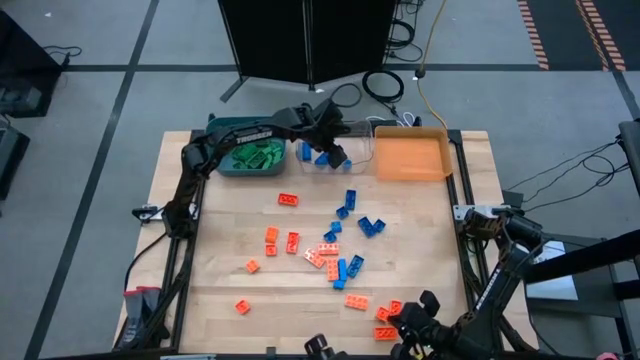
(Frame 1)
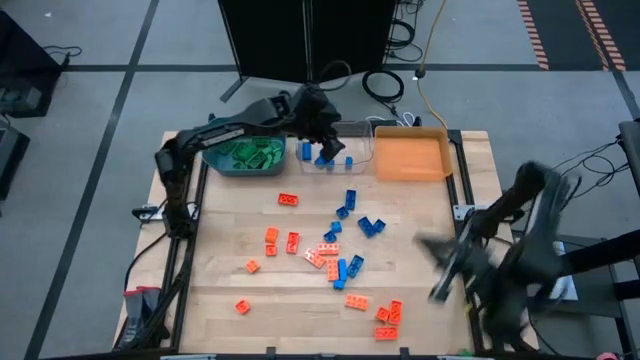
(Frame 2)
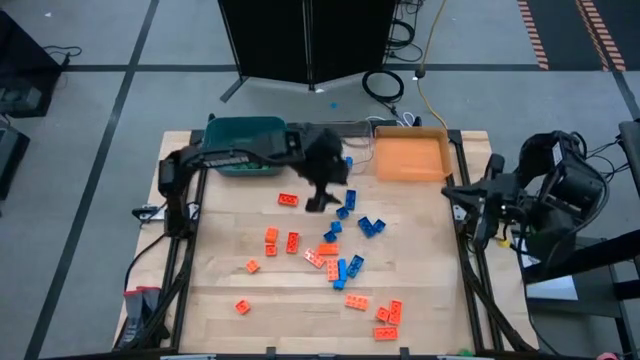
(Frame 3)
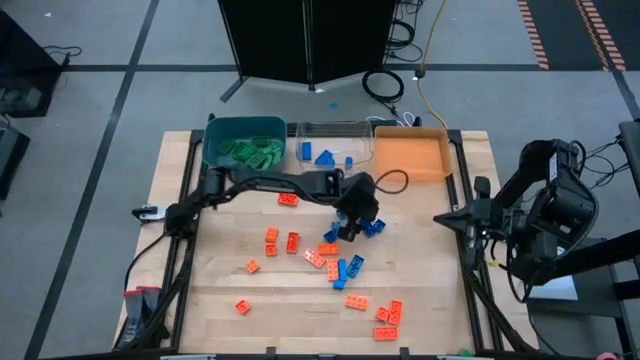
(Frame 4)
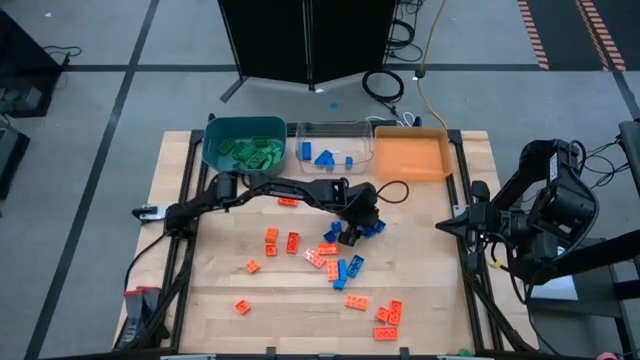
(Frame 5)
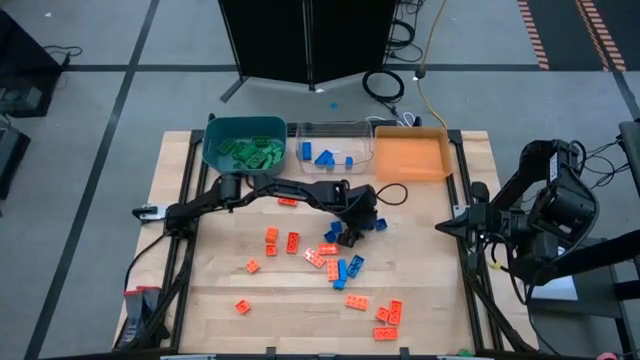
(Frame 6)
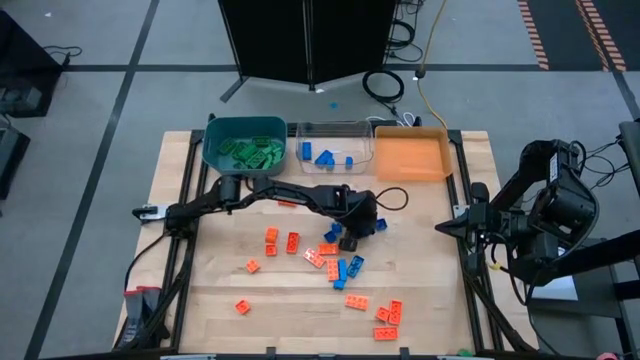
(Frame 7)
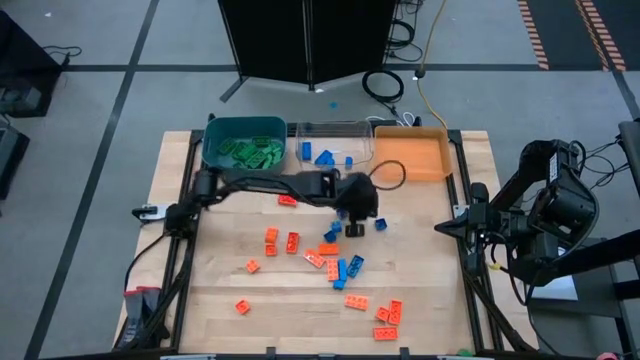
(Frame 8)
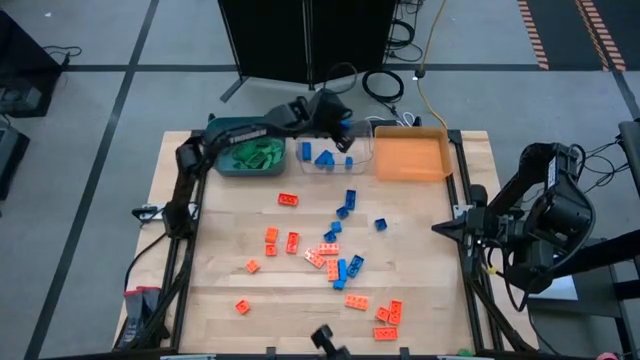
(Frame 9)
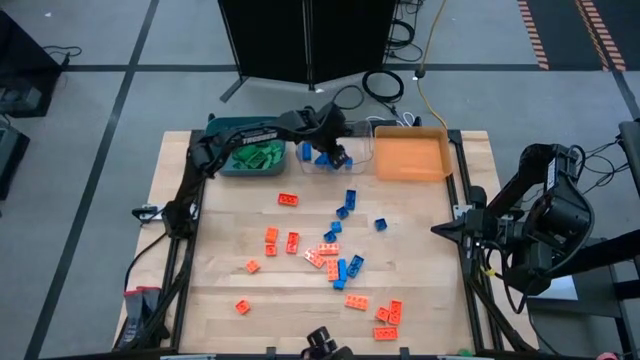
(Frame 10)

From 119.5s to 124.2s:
Task: Sort blocks
Put the blue game piece into the transparent bin

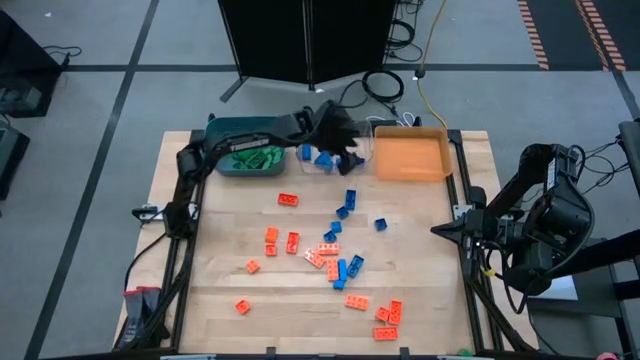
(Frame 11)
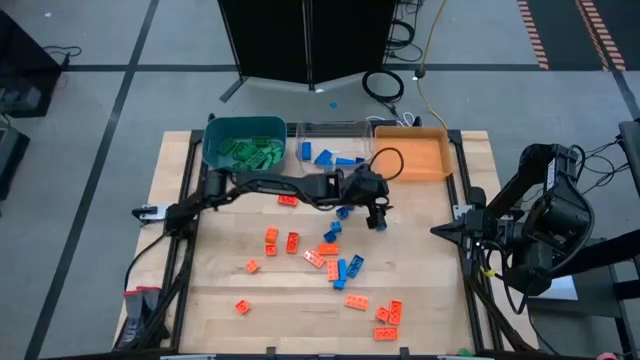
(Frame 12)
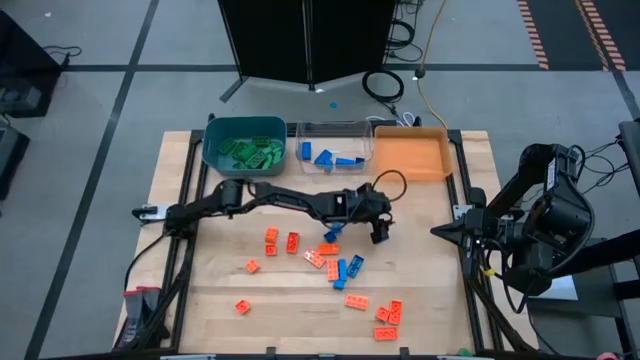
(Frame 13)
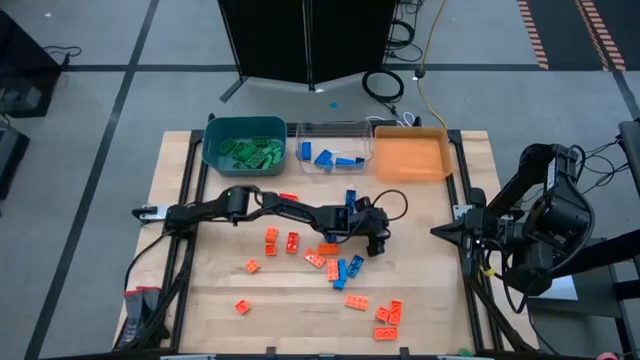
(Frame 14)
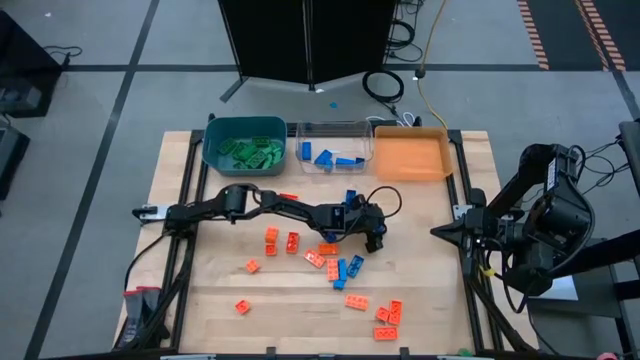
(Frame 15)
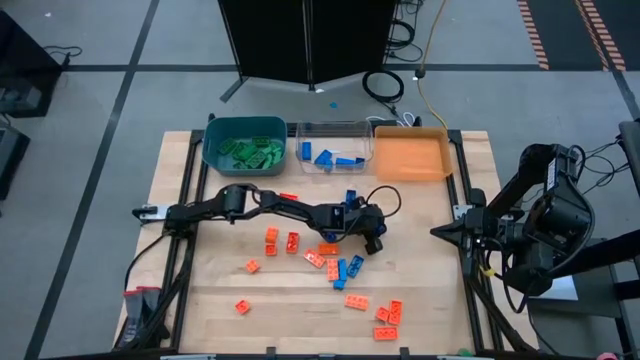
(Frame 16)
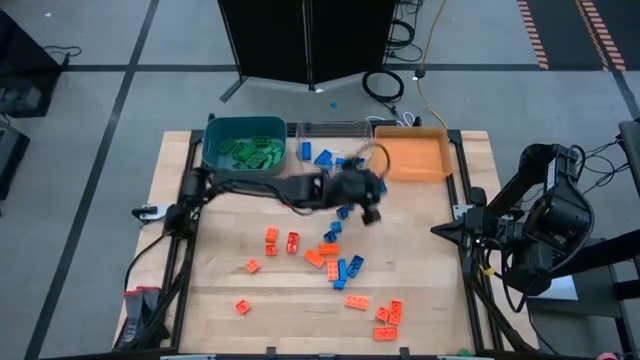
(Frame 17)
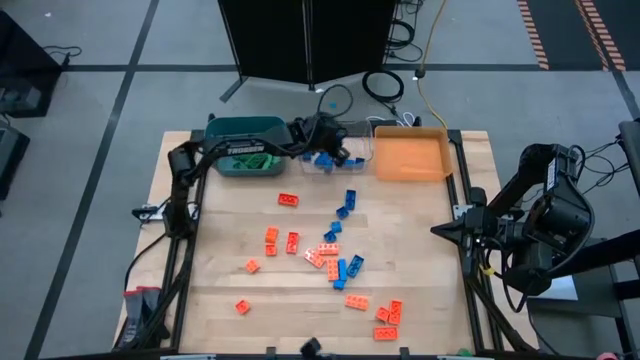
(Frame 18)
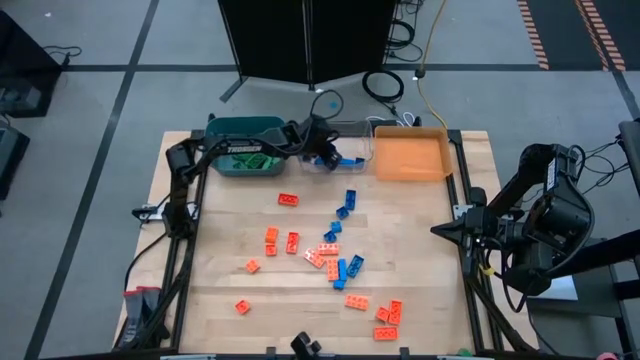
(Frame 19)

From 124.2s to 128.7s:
Put the blue game piece into the transparent bin

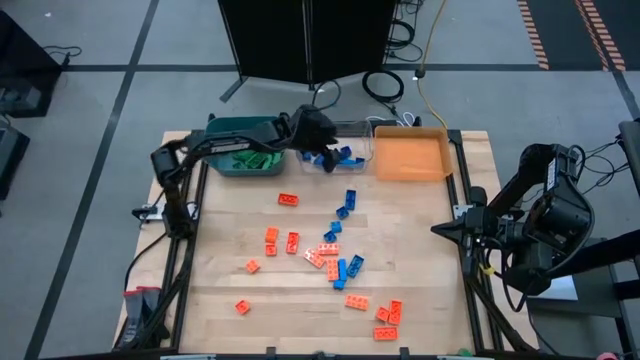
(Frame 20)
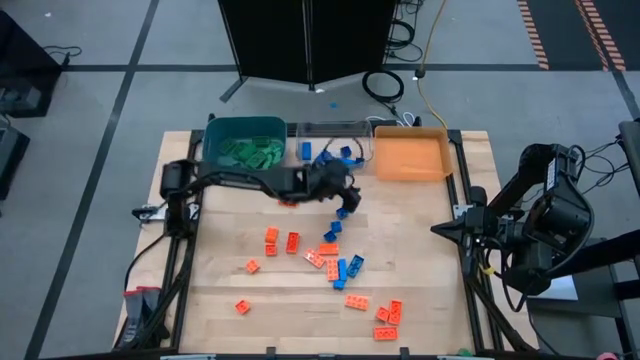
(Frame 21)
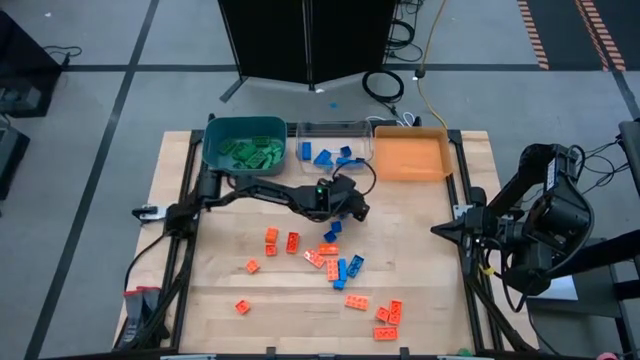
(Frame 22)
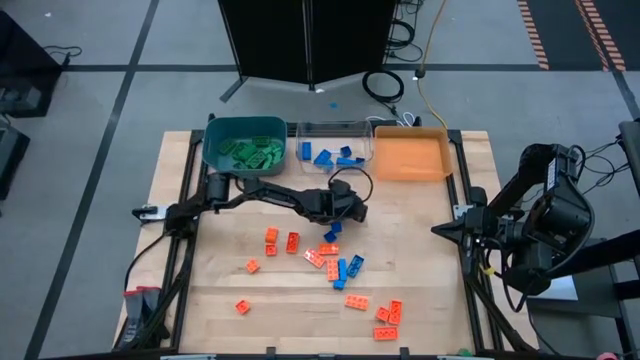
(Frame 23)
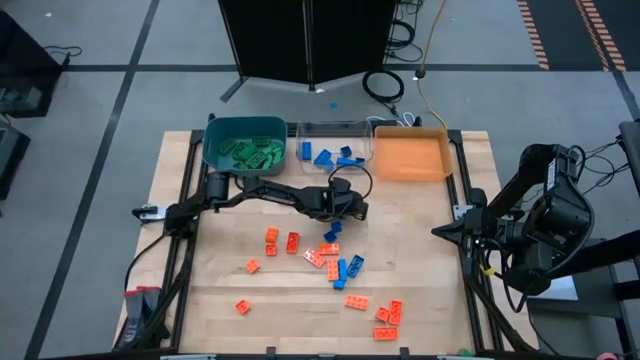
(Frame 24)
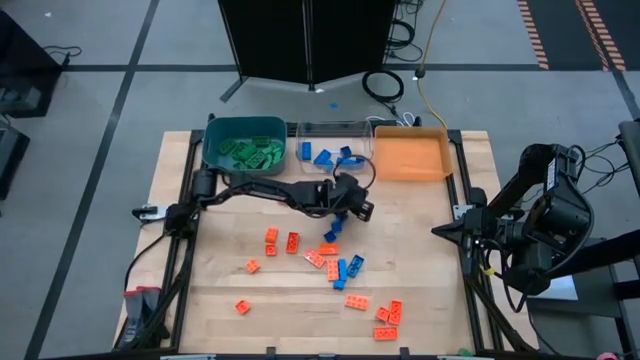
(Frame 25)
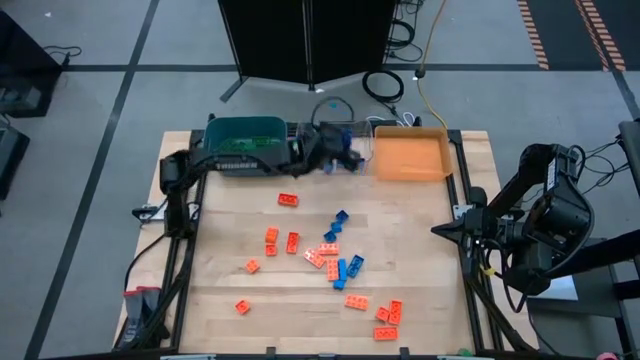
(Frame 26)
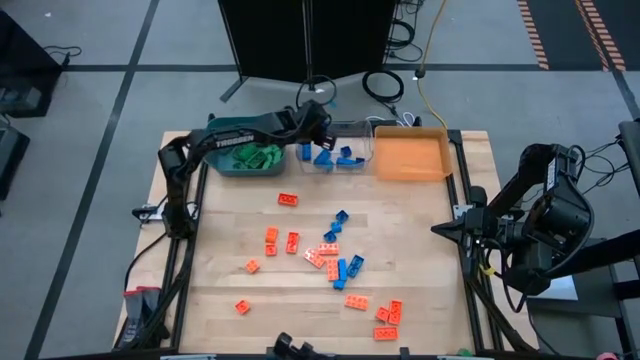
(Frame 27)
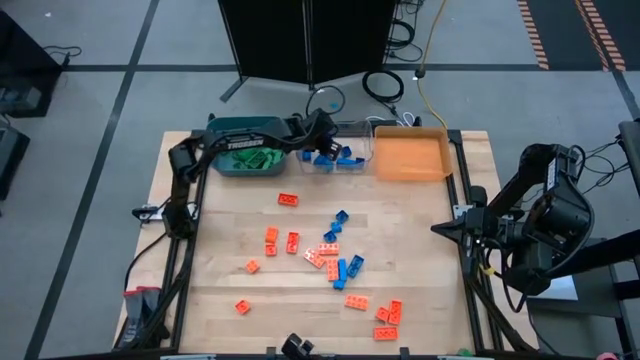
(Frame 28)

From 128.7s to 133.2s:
Put the blue game piece into the transparent bin

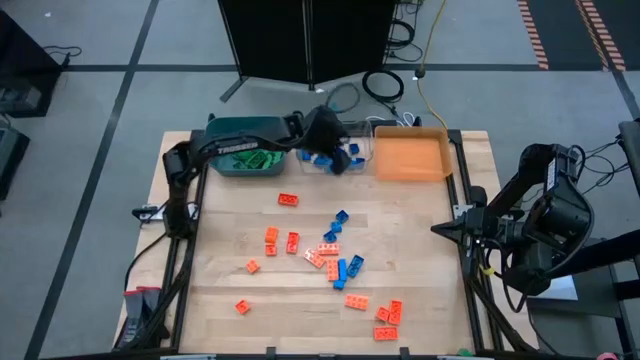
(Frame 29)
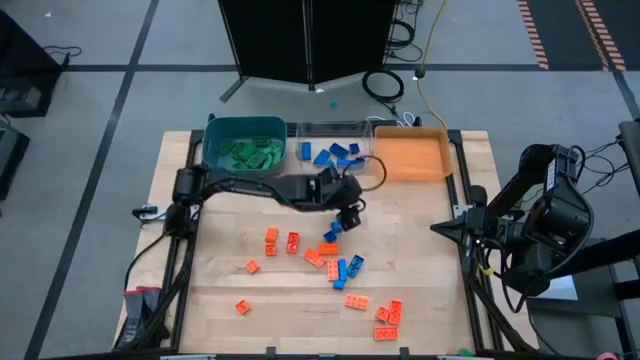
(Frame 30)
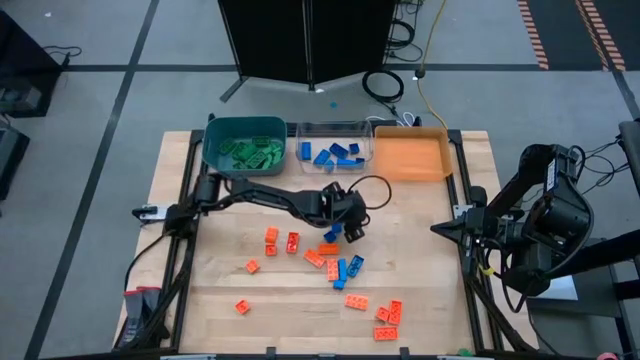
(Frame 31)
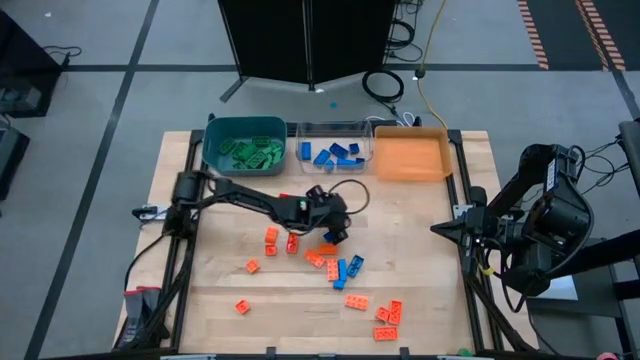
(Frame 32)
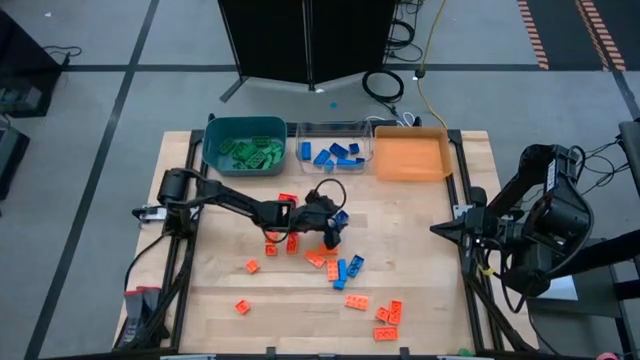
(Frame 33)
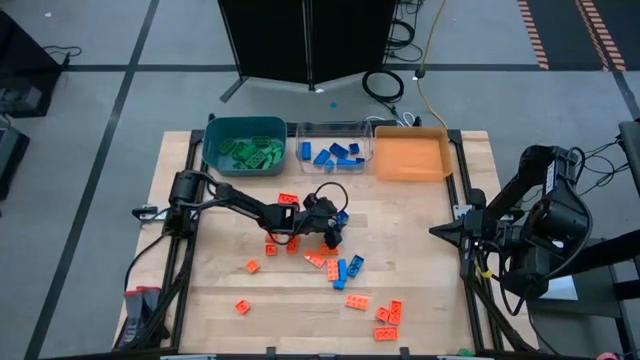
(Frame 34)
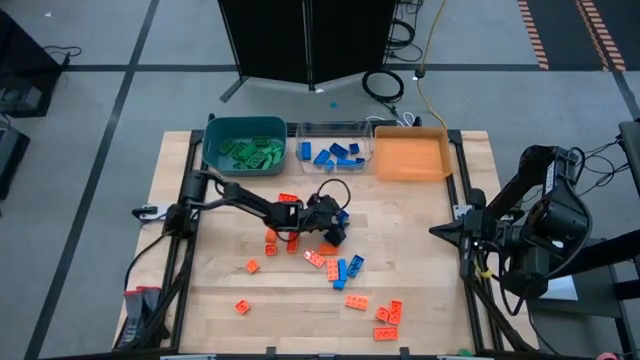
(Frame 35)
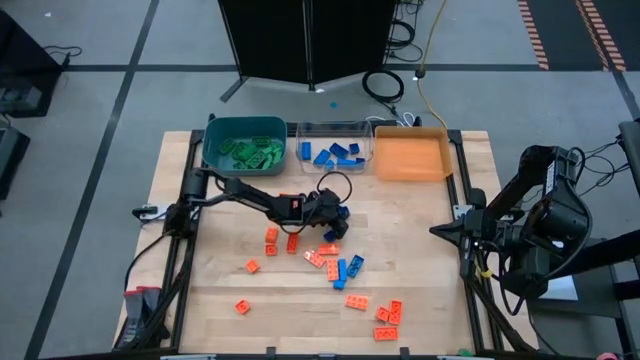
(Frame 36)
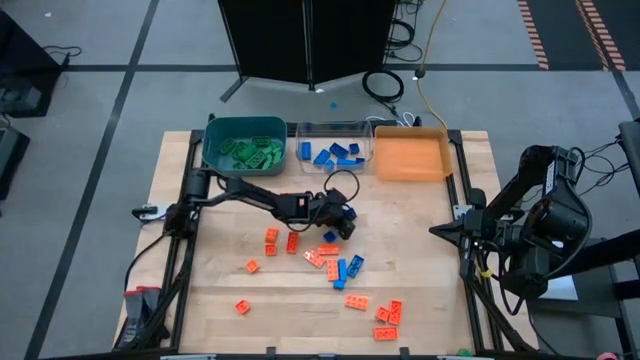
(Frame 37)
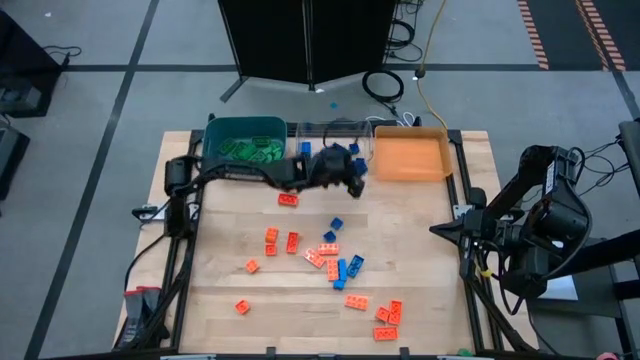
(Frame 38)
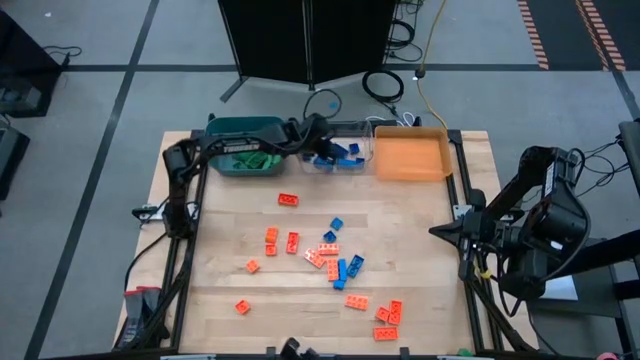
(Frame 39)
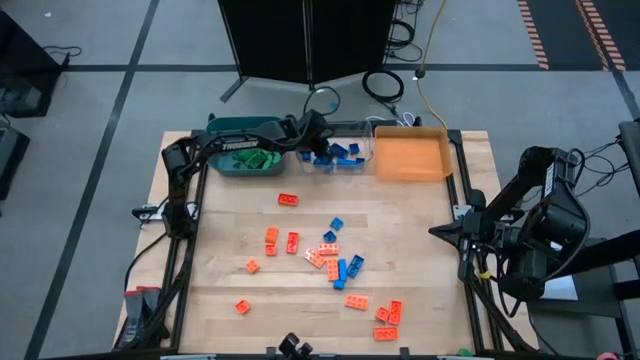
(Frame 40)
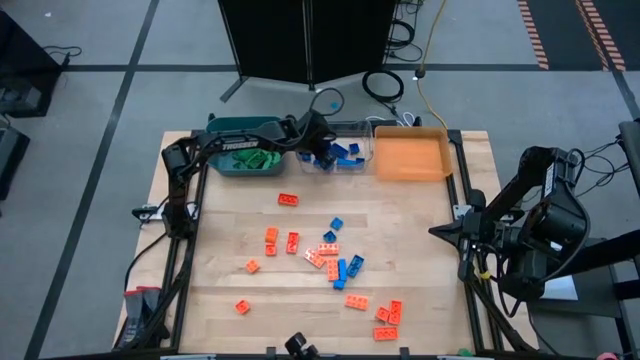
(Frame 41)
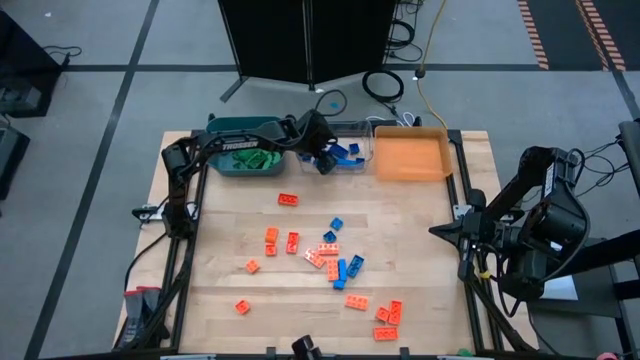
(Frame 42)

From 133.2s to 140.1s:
Put the blue game piece into the transparent bin
